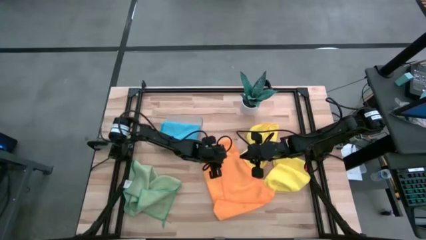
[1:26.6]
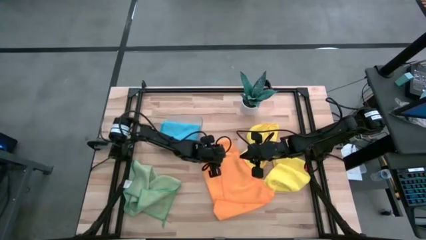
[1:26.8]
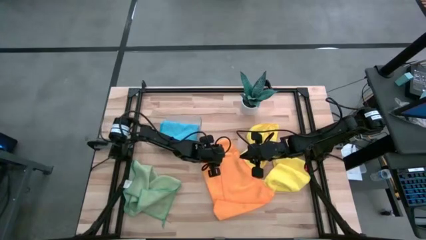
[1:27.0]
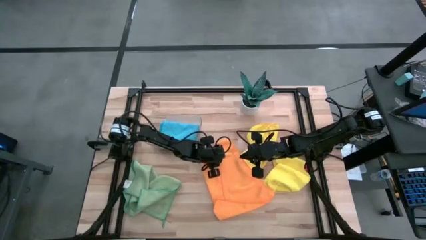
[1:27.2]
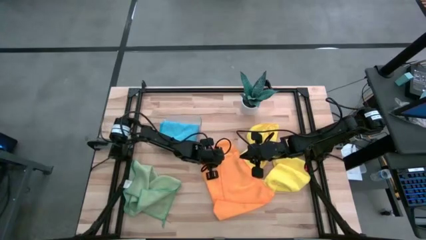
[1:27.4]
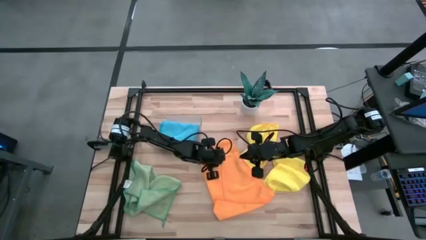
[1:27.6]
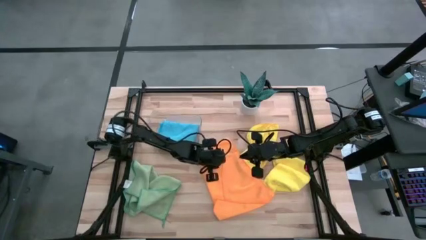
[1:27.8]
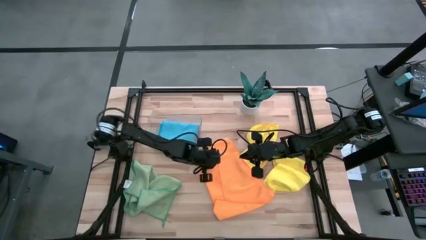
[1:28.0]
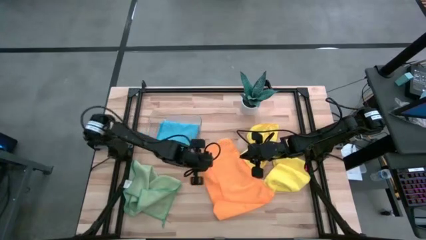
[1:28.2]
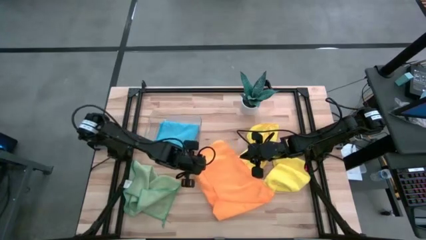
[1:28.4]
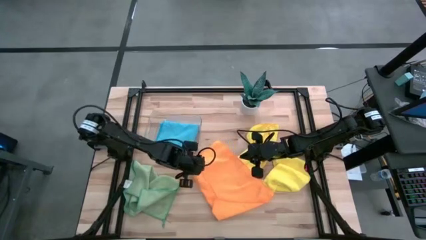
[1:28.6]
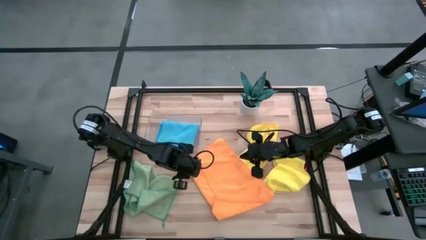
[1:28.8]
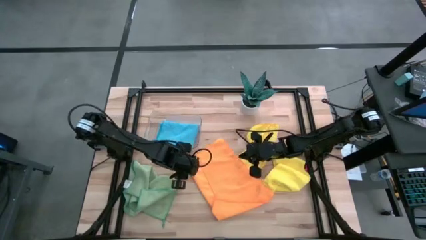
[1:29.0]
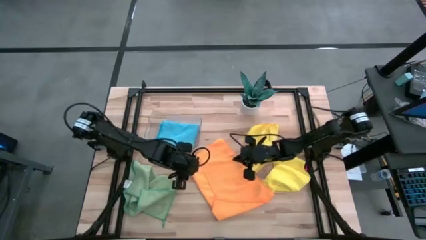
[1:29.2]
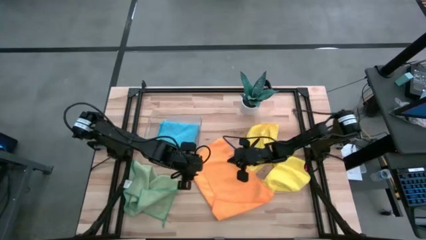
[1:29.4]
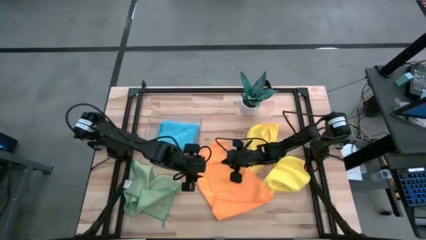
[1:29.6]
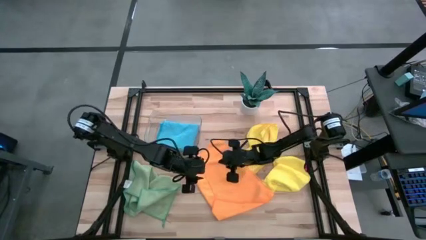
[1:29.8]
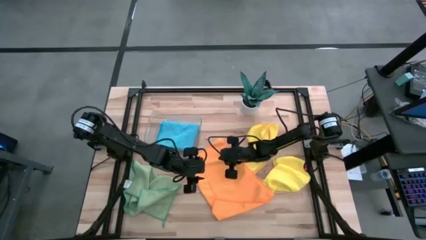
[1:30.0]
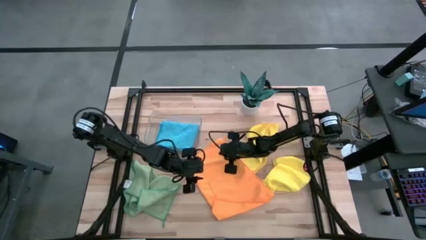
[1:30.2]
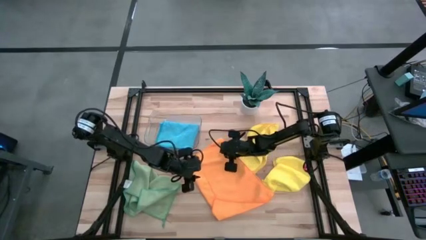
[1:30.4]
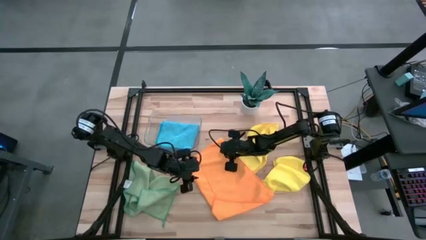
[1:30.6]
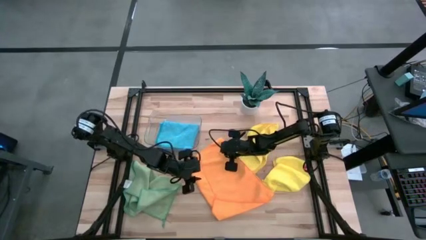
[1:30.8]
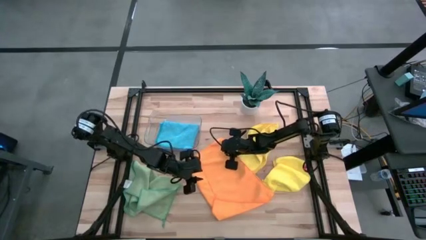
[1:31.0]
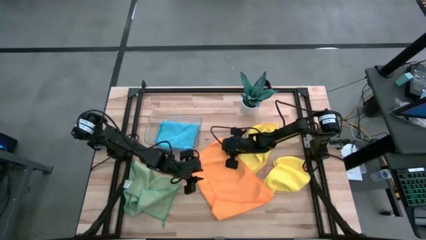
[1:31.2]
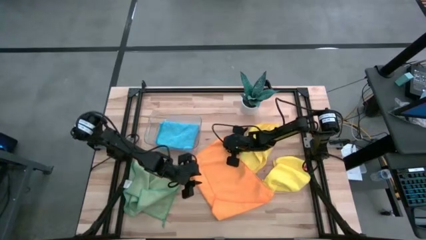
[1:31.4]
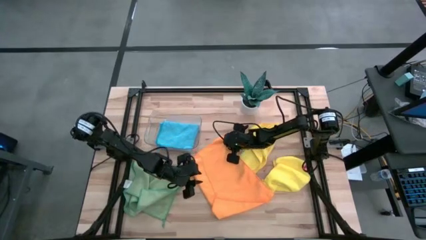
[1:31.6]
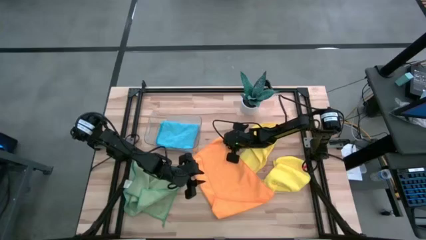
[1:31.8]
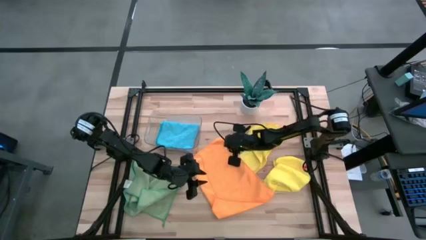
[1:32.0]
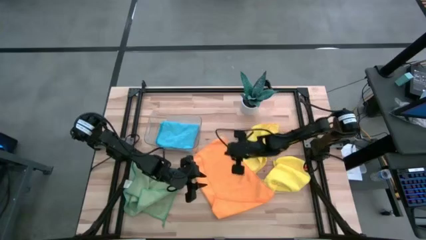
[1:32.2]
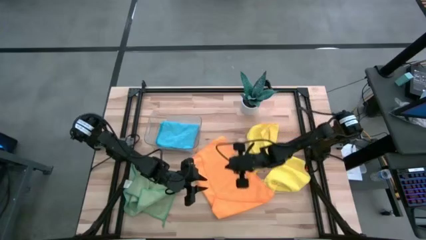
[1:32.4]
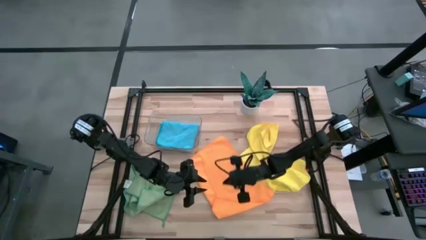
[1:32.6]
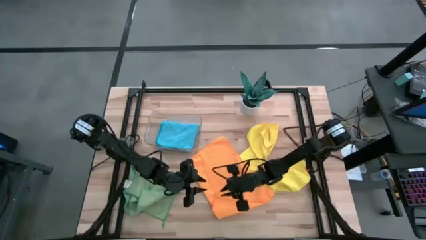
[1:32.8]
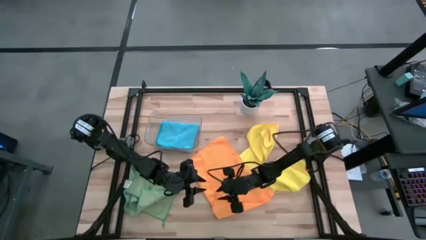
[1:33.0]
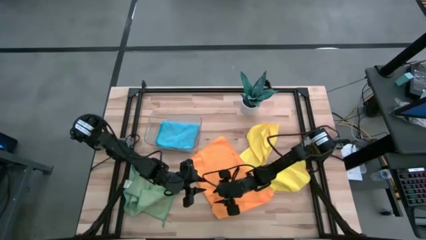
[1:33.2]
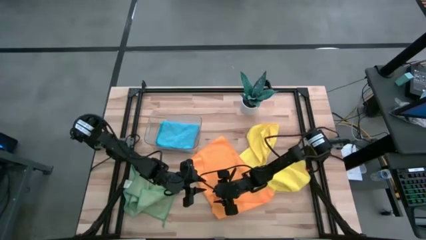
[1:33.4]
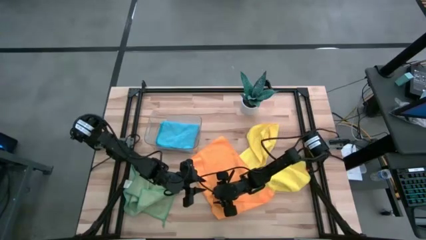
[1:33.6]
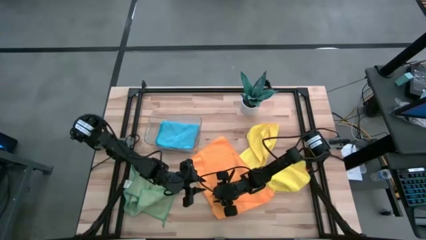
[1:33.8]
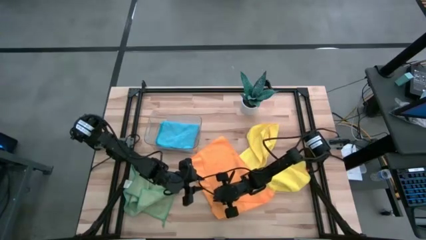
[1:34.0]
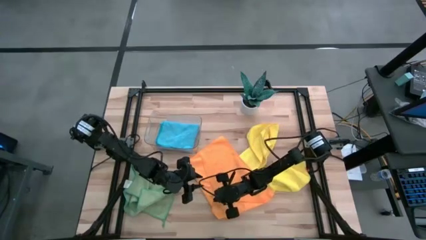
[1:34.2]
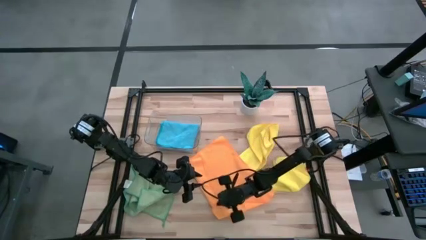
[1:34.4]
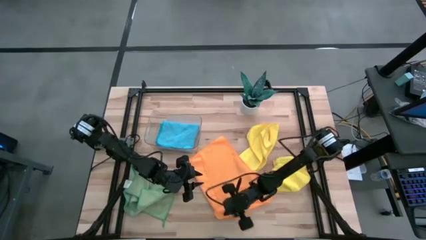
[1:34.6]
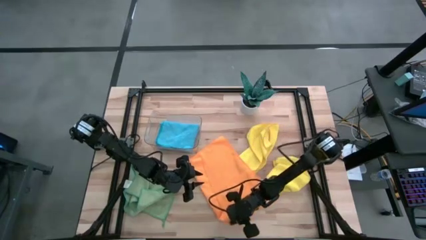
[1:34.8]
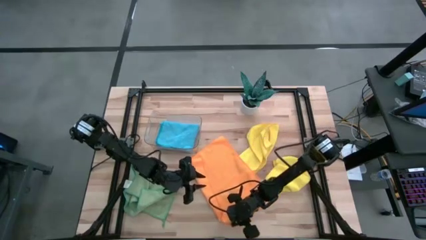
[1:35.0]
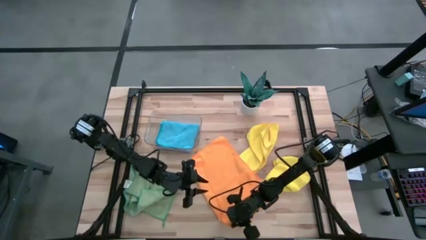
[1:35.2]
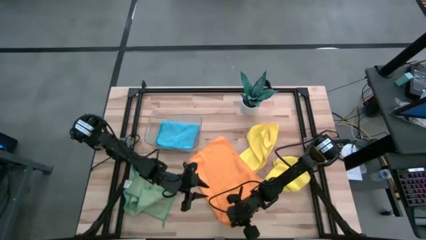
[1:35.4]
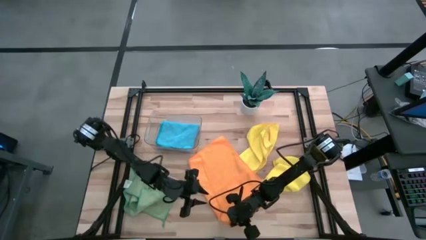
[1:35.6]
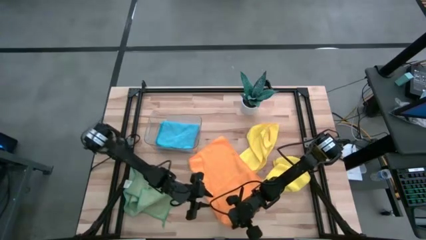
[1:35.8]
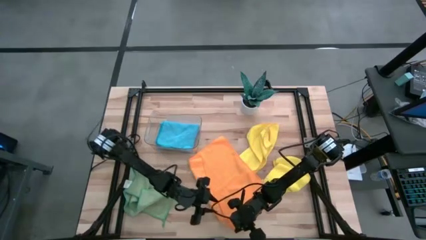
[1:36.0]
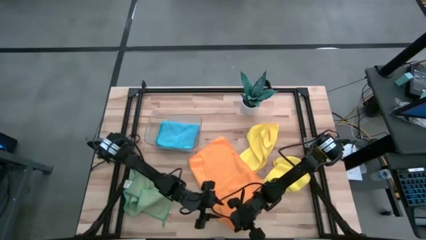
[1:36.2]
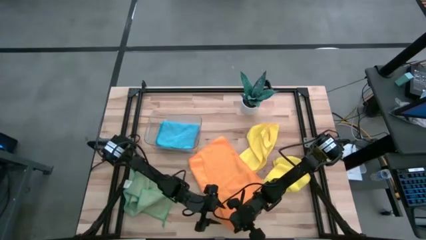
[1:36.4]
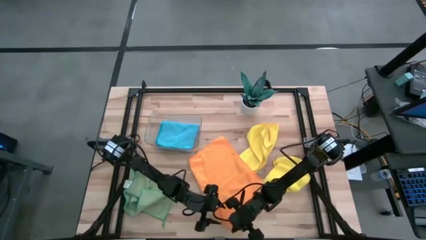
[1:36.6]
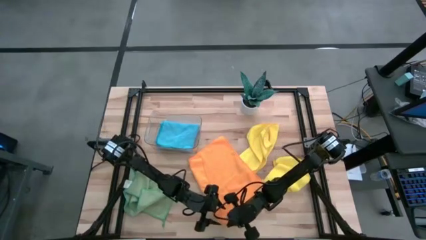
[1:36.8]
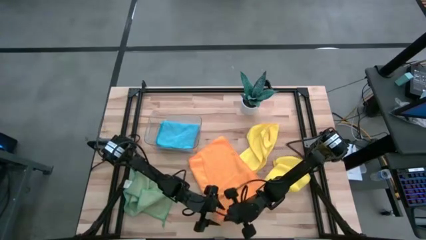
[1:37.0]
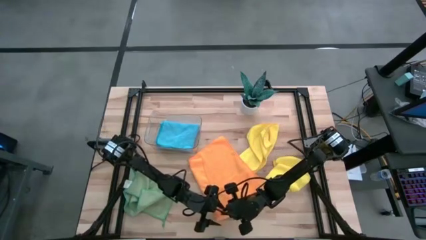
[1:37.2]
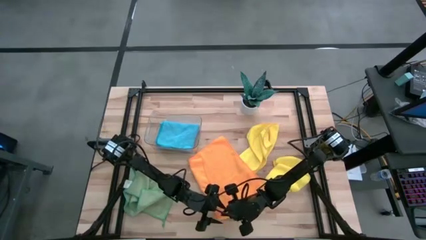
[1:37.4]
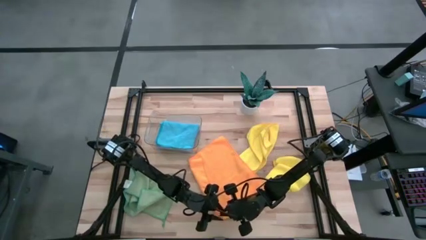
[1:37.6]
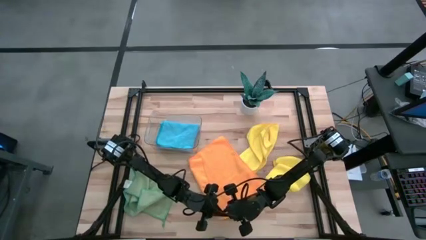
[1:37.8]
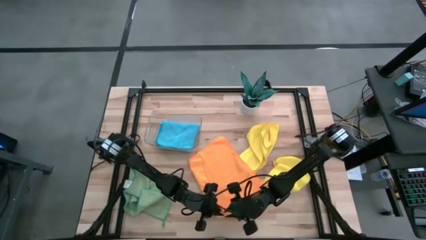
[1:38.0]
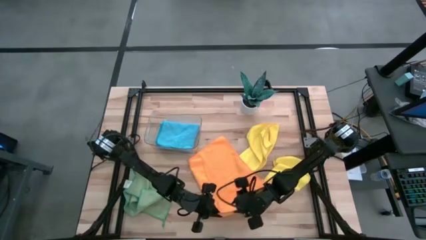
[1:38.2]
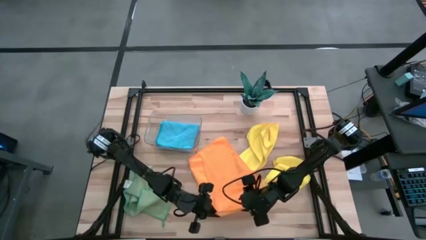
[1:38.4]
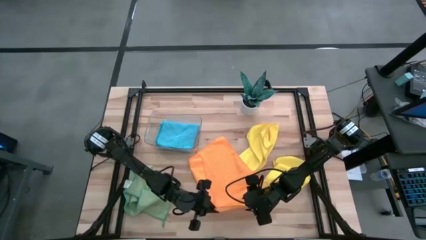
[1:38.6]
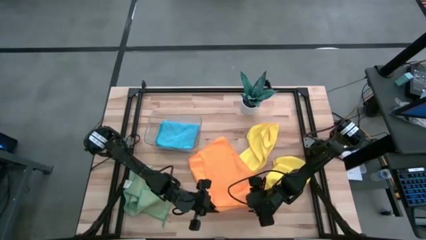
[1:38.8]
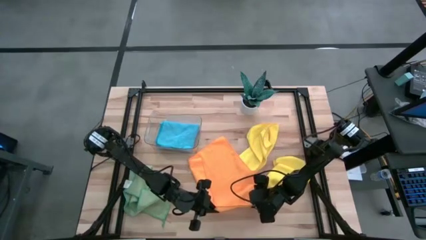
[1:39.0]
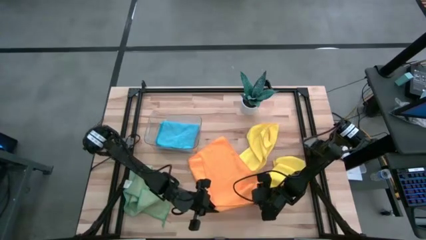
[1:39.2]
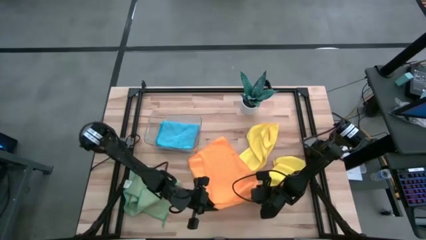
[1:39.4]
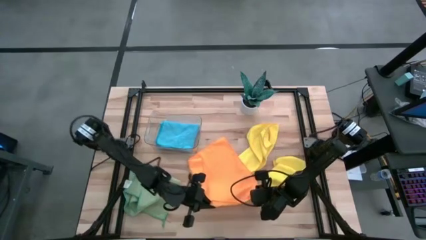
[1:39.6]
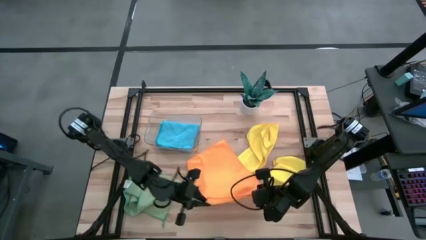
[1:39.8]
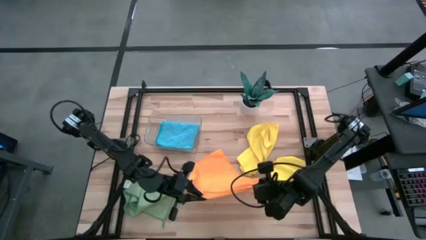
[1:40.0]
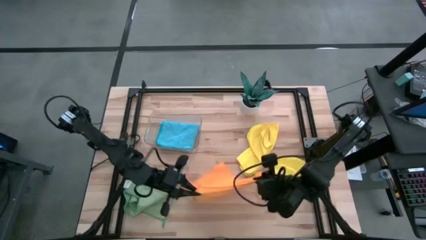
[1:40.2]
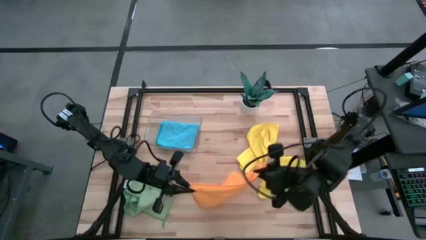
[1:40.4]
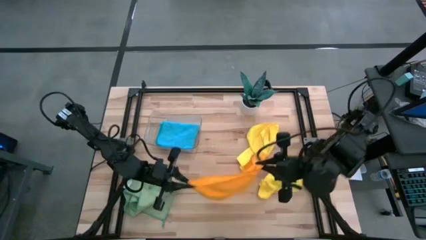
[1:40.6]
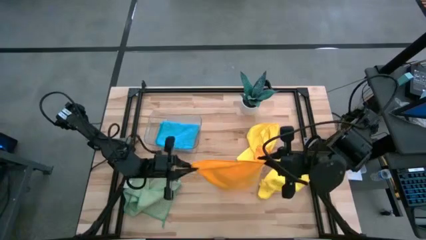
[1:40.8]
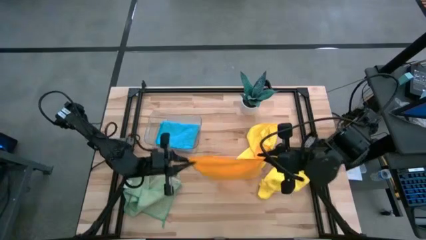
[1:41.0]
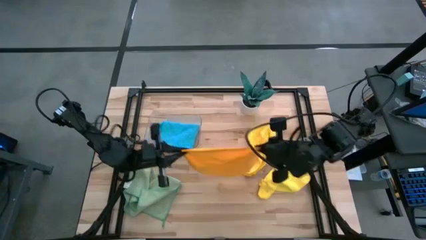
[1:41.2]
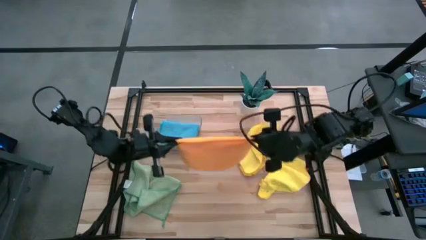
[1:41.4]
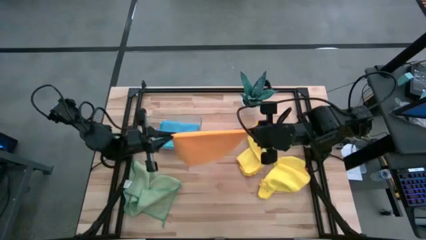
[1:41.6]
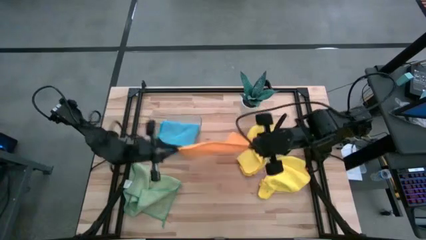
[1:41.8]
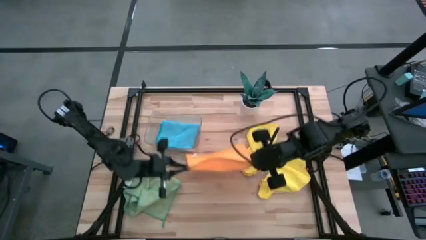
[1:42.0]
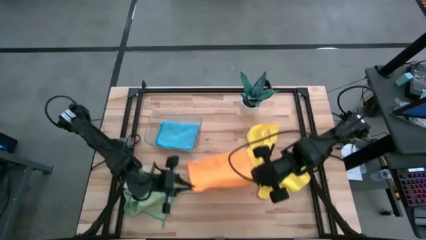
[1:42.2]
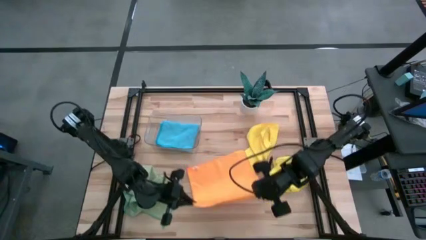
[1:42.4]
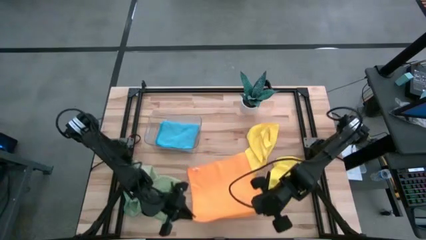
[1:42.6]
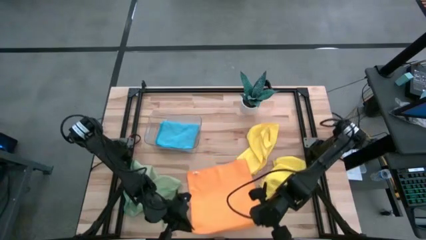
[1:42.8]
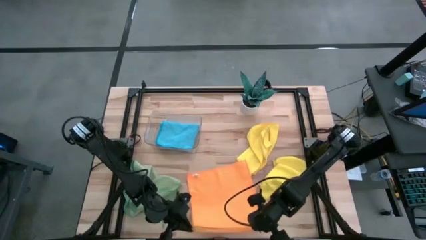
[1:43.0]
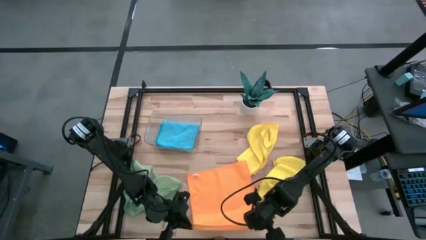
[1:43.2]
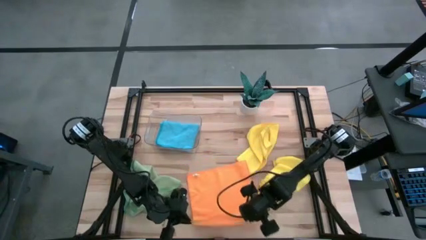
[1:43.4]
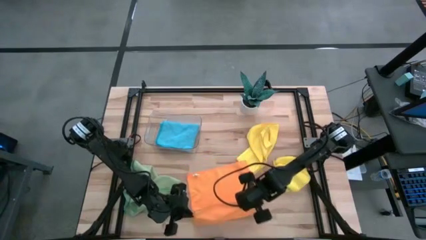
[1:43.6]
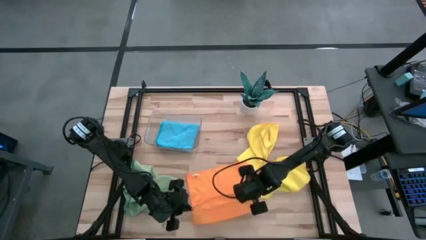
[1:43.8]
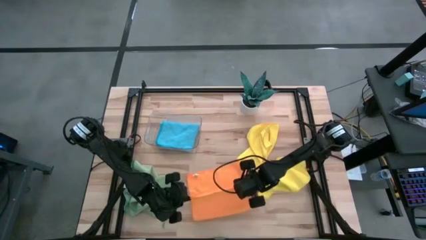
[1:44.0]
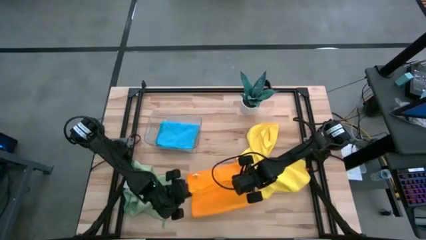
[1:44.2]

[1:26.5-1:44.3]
Task: Fold microfiber towels
Fold the orange microfiber cloth
